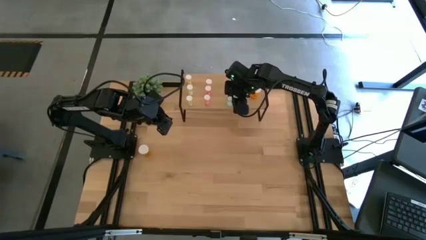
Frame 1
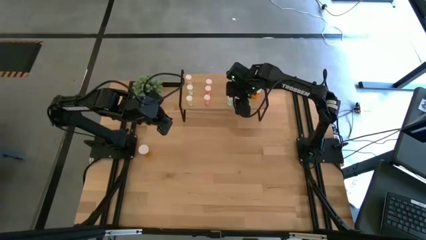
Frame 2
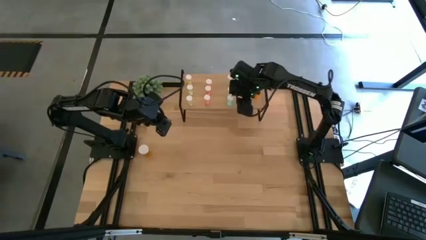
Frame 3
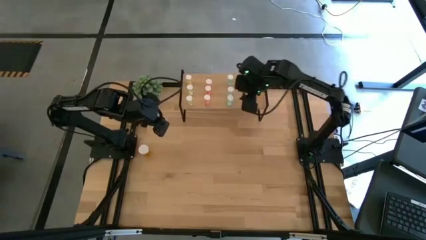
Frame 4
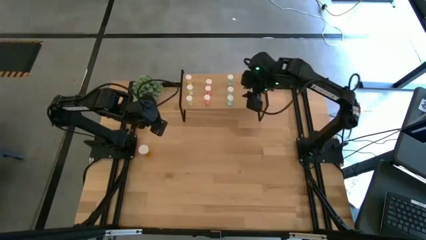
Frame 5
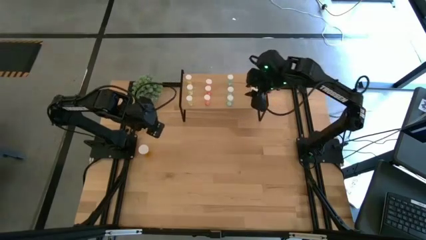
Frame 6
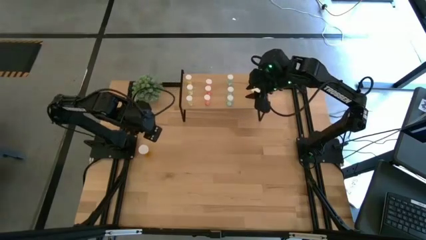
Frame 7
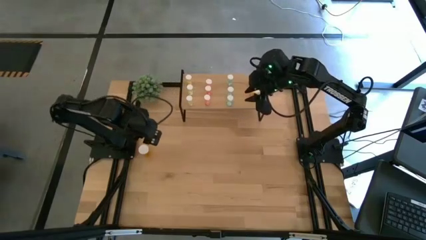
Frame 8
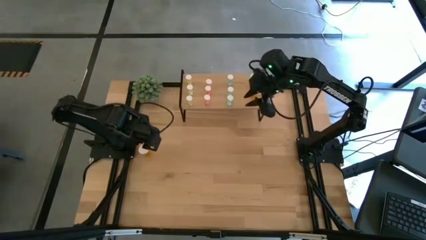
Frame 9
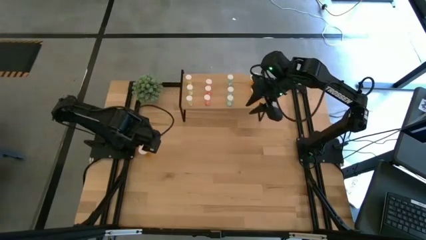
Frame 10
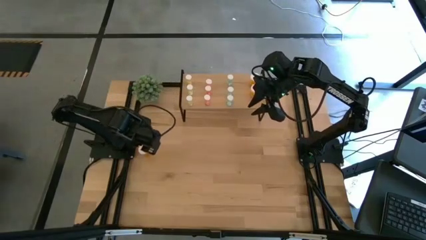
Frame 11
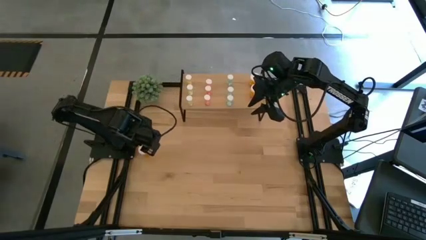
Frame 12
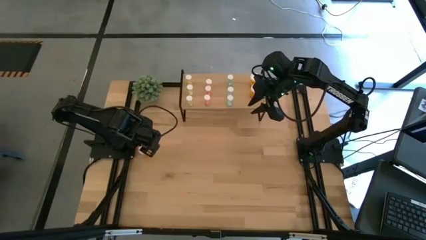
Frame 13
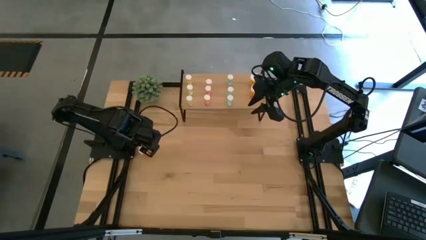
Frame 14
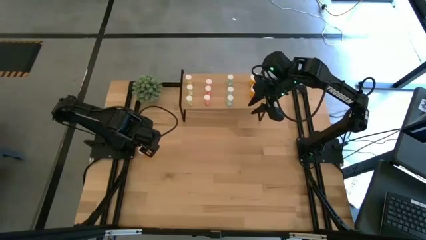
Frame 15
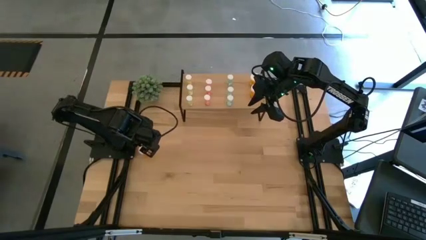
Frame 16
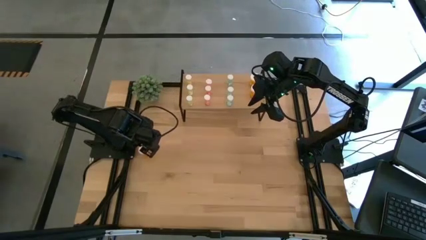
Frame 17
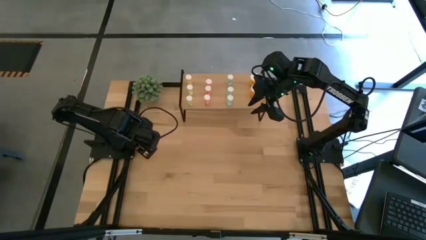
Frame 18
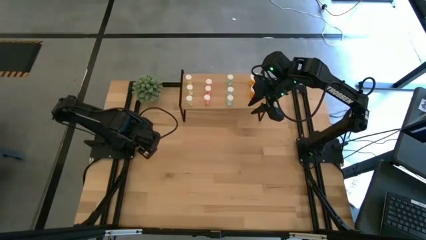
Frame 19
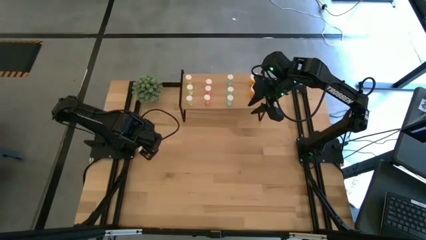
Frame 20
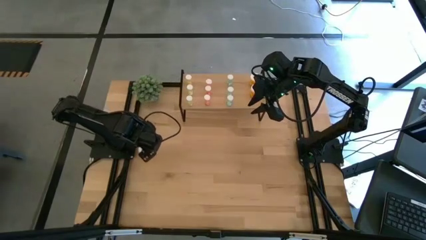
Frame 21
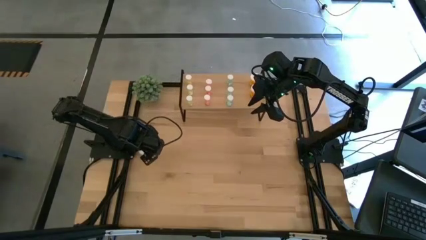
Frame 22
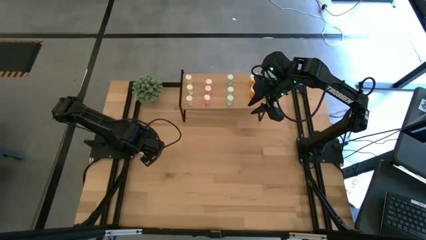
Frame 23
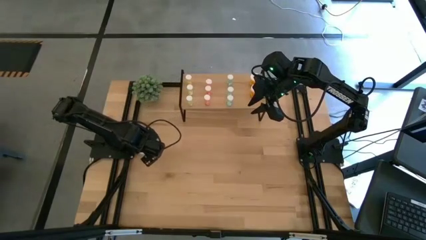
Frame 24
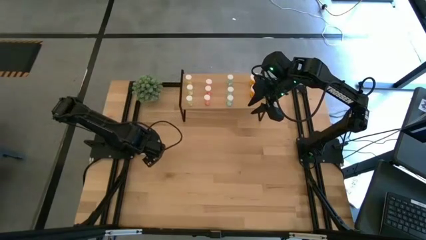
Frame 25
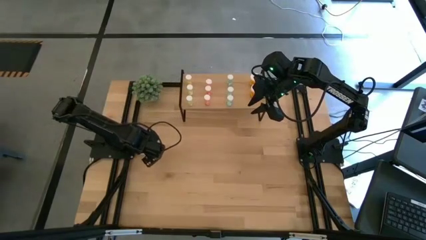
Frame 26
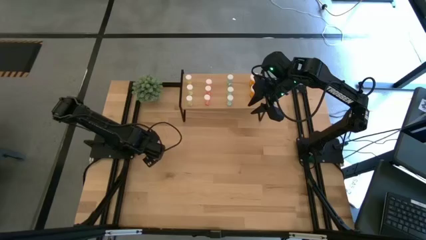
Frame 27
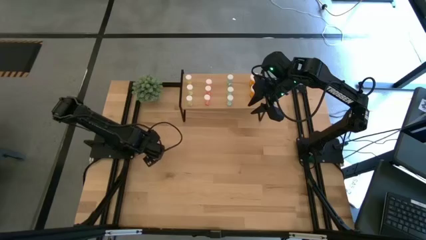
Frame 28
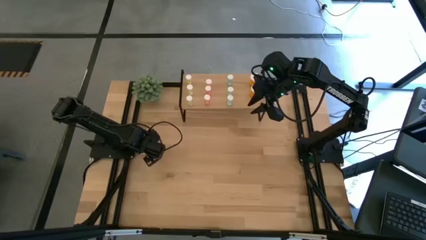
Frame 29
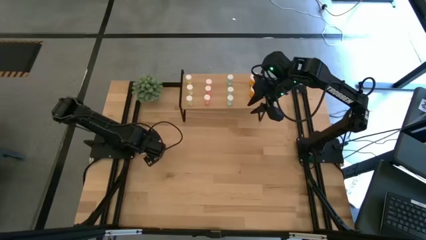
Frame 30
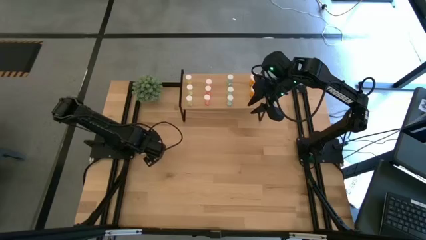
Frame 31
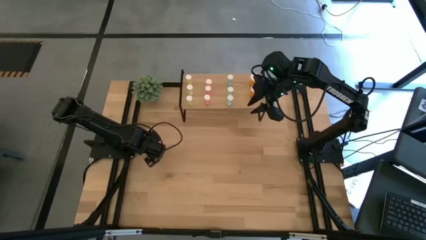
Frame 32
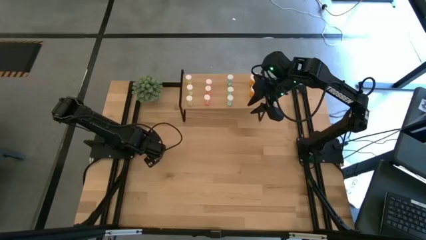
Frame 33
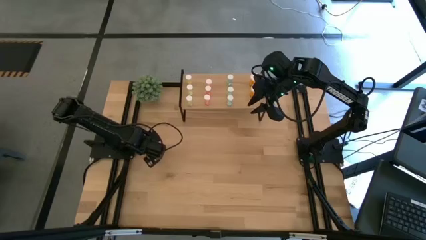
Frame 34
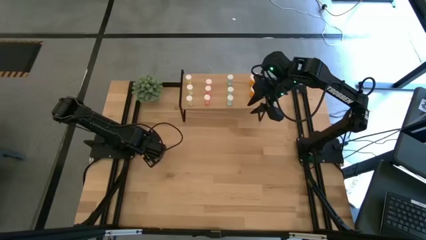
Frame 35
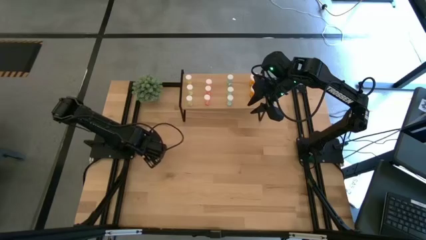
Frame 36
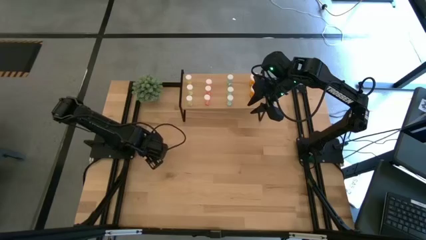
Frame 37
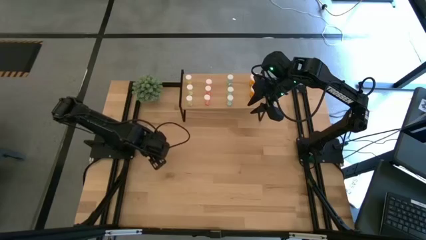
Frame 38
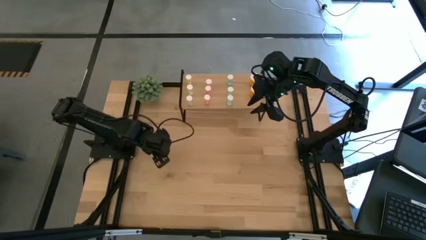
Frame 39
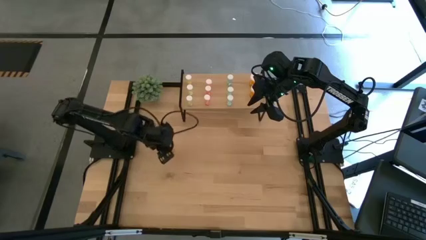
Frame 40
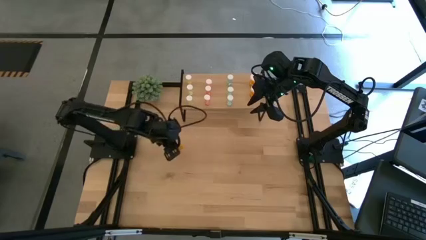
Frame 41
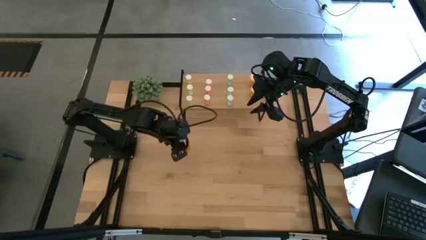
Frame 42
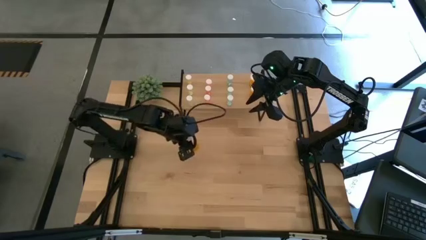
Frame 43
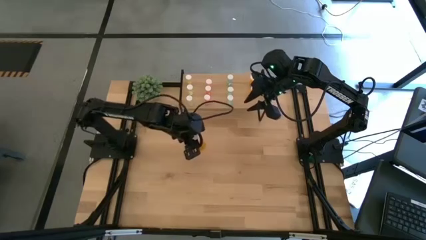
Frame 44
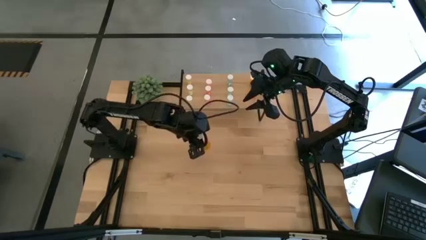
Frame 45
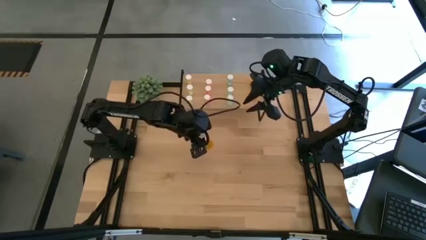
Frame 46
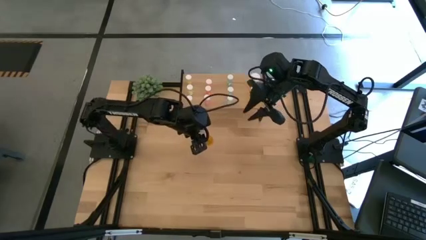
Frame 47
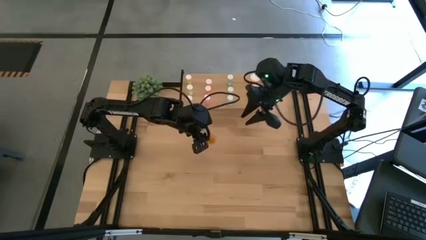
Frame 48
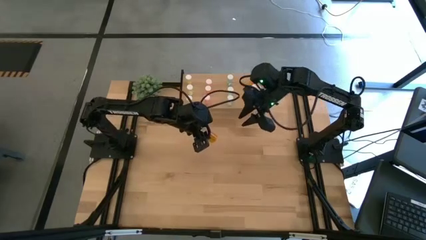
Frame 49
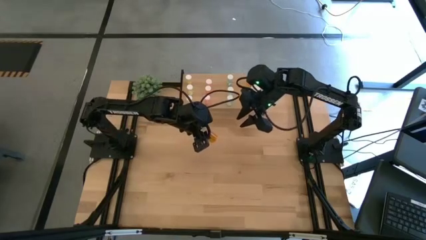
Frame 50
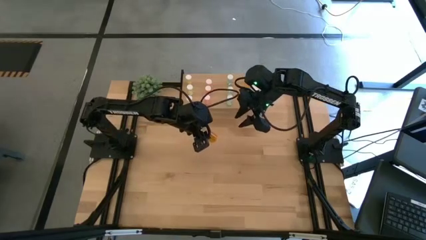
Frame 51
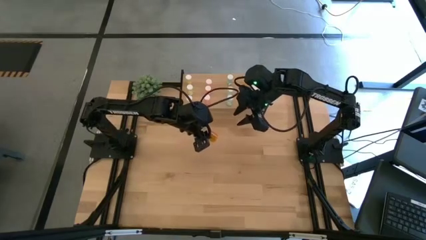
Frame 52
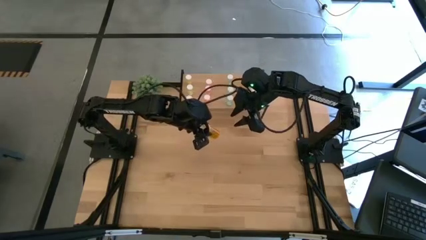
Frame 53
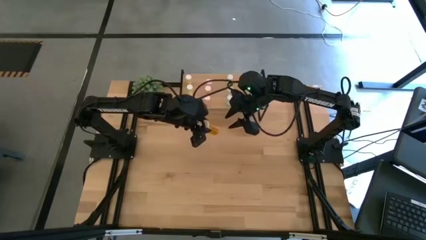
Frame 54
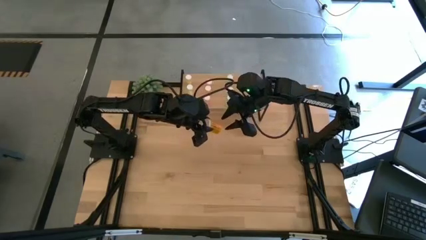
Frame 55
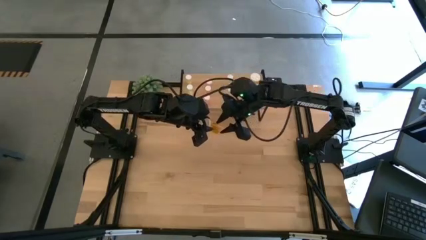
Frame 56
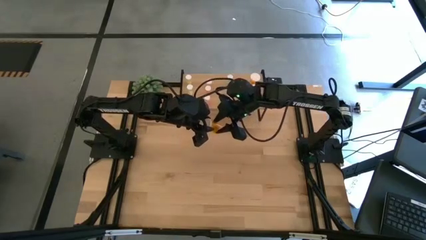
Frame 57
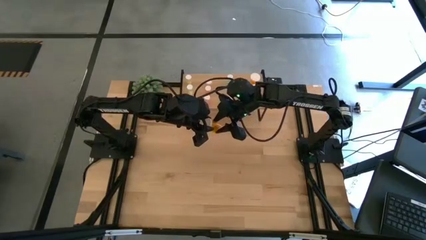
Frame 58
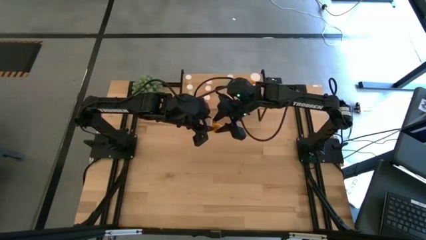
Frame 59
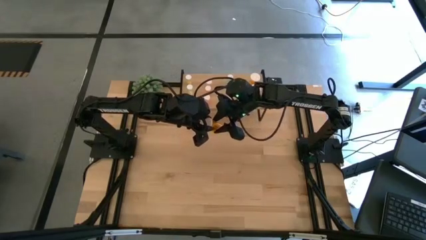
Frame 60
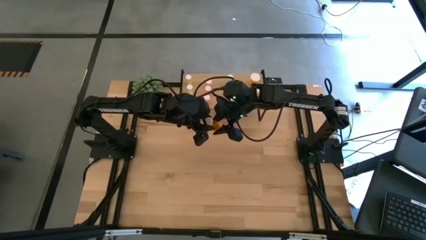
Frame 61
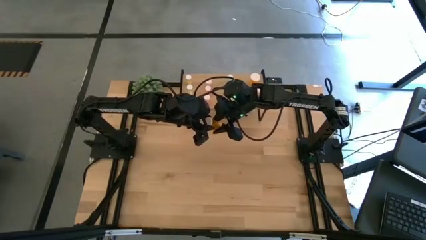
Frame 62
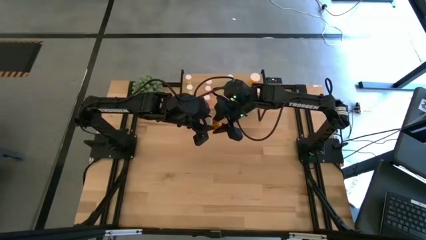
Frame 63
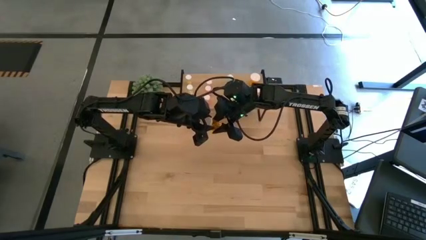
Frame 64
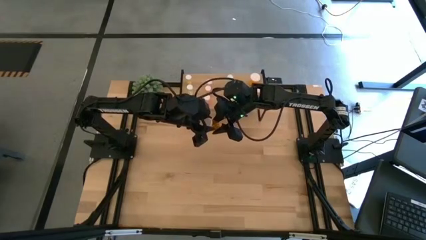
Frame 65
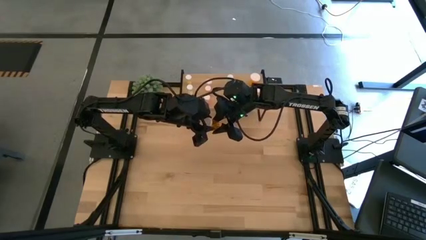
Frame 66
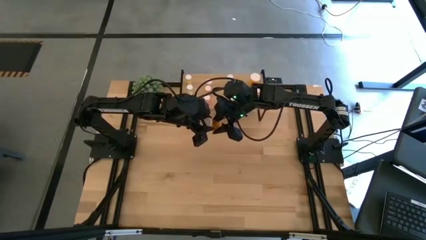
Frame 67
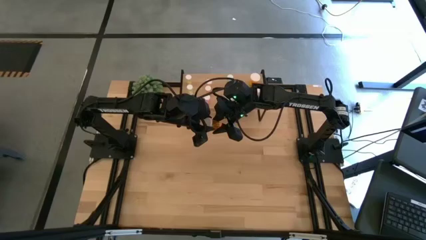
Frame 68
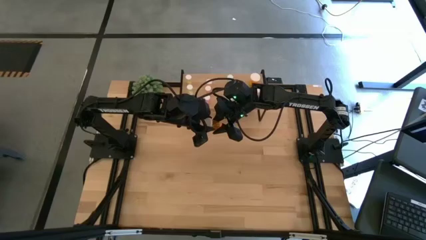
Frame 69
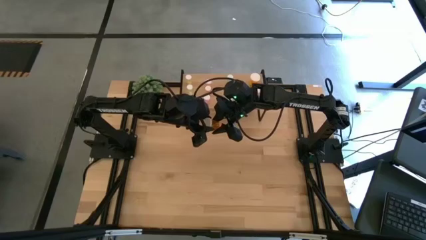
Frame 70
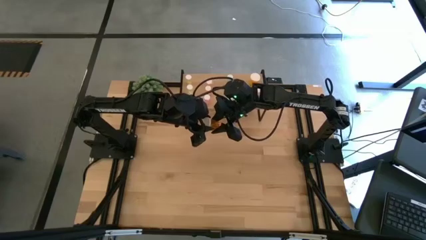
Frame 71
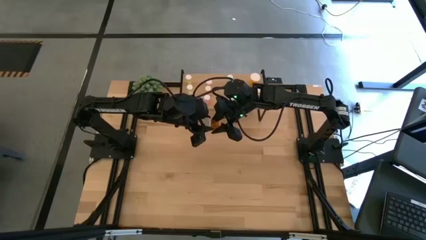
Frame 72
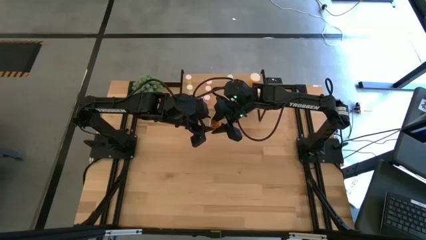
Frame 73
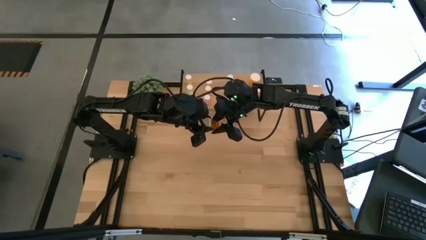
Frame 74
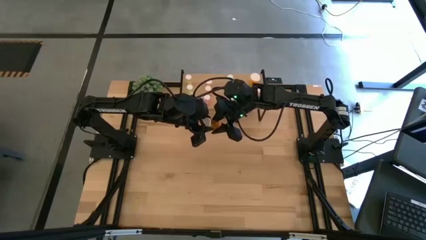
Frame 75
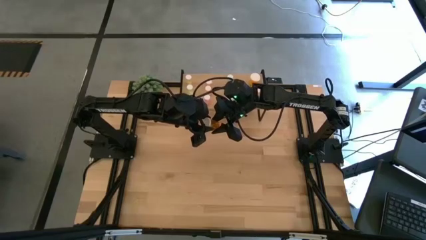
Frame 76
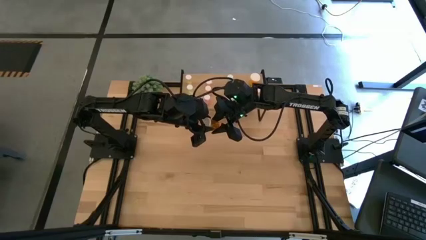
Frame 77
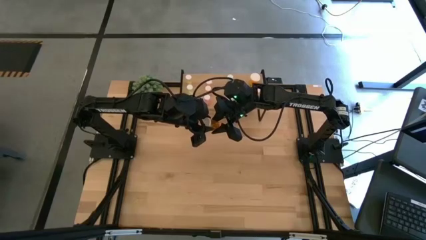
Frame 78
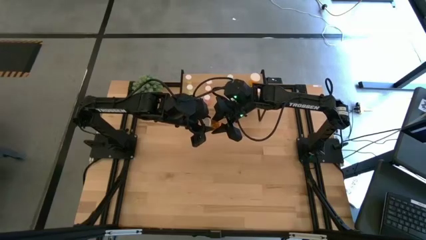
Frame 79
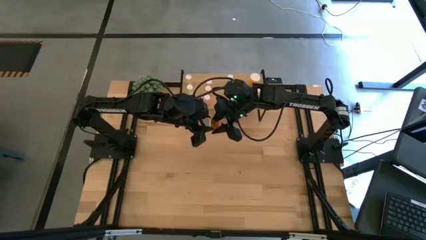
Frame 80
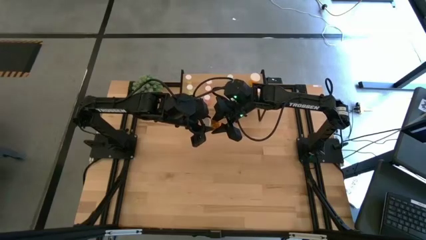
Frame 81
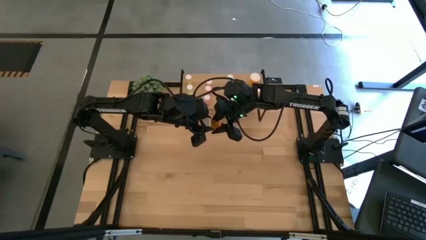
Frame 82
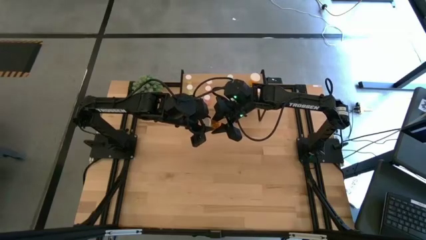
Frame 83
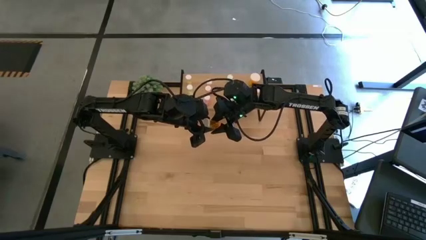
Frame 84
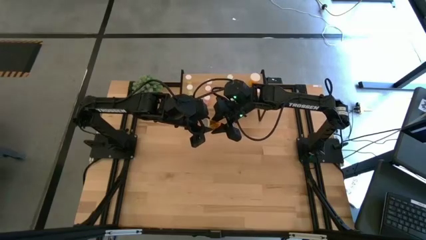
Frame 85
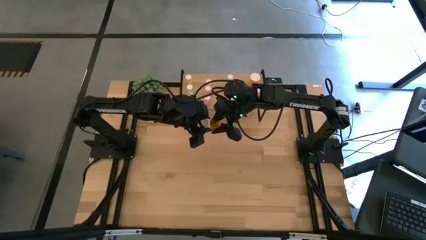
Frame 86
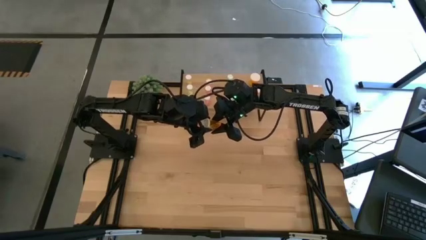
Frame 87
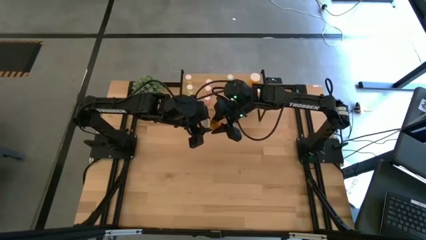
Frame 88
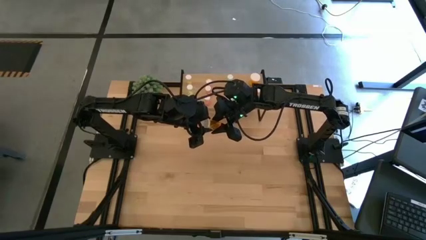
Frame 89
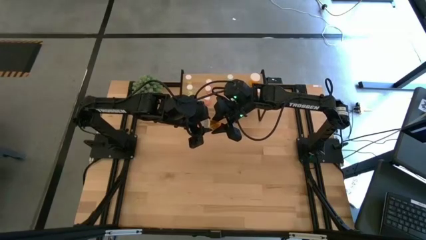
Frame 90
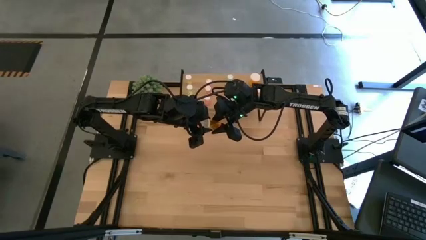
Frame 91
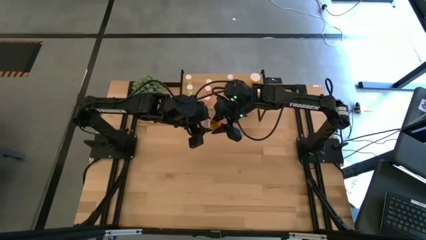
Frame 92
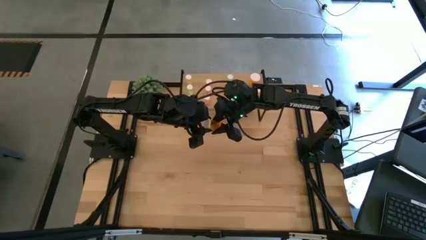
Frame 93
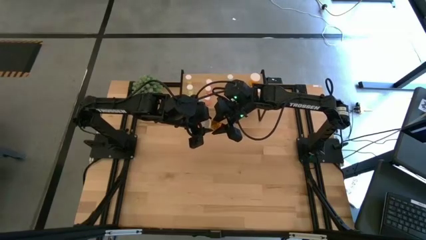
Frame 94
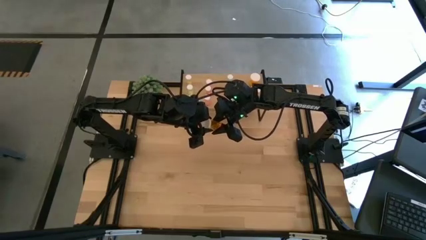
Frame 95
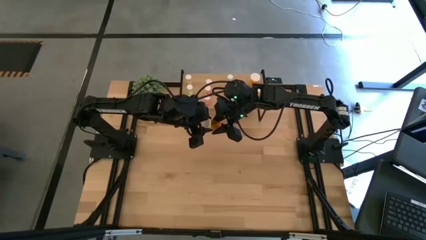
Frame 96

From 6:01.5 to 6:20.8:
Task: Pick and place medicine bottles onto shelf by color
Put the orange pill bottle on the shelf aligned with the other orange pill bottles
